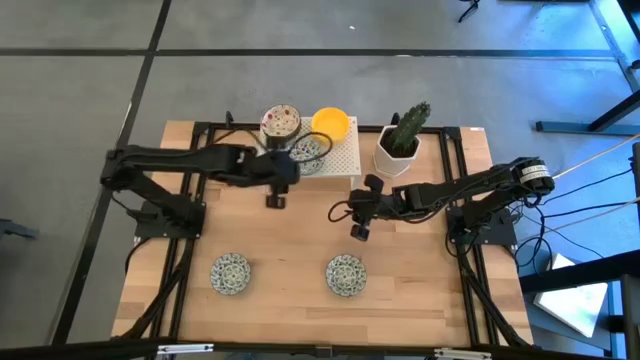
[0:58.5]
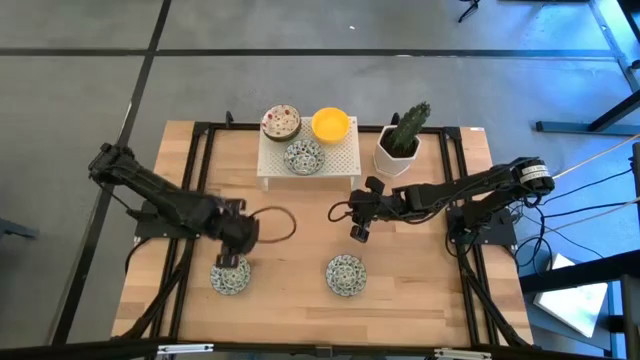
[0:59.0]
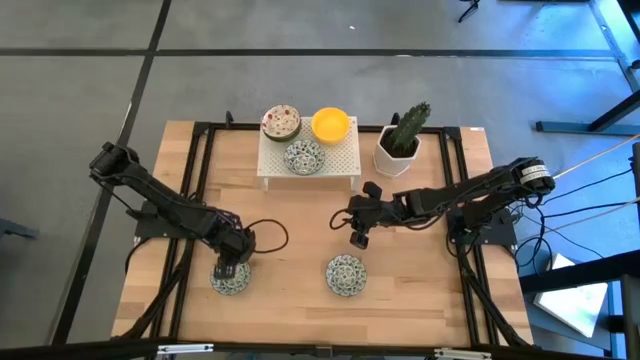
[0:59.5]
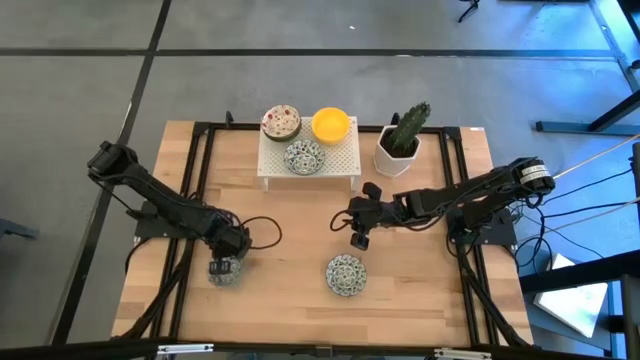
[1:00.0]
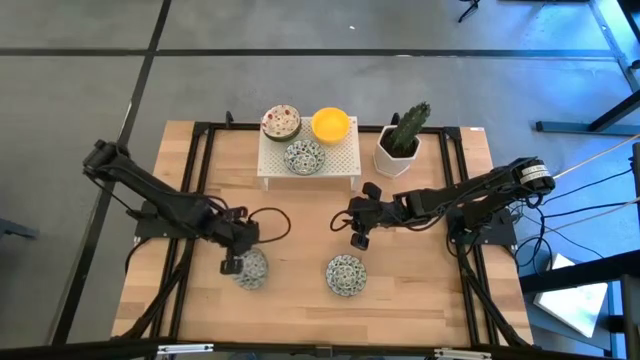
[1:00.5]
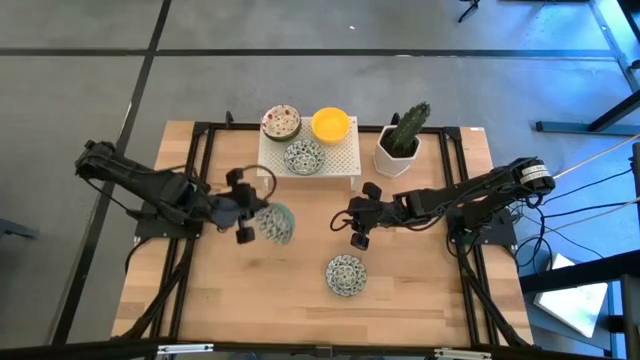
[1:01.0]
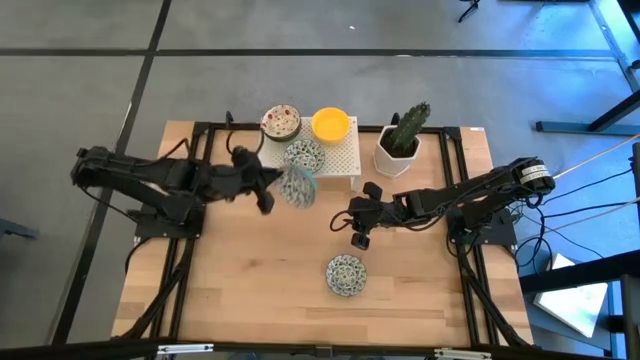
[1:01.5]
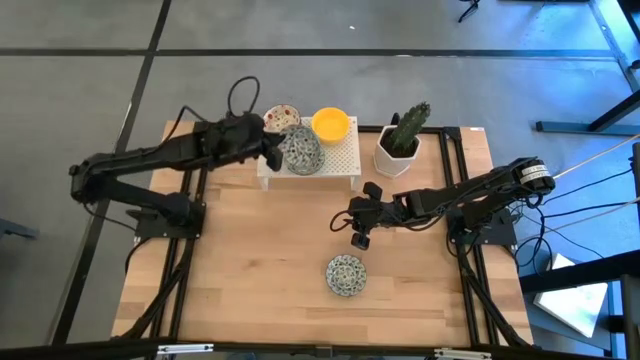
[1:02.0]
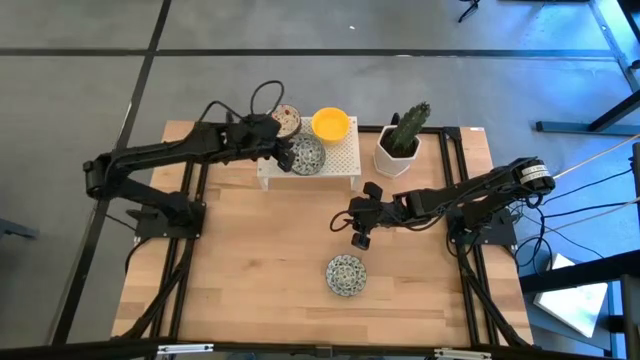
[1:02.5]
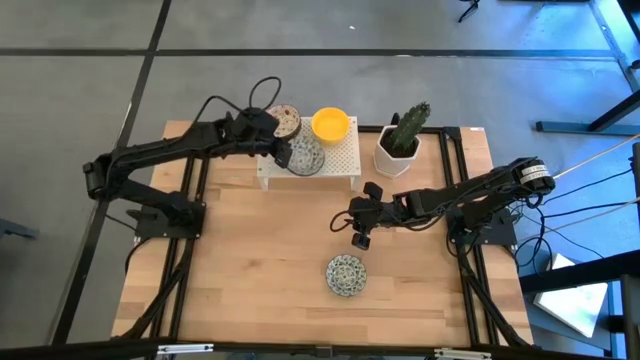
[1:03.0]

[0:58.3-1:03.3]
Task: Pick & Place Mini bowls
Stack the left blue patterned bowl on top of the blue patterned bowl on the shelf

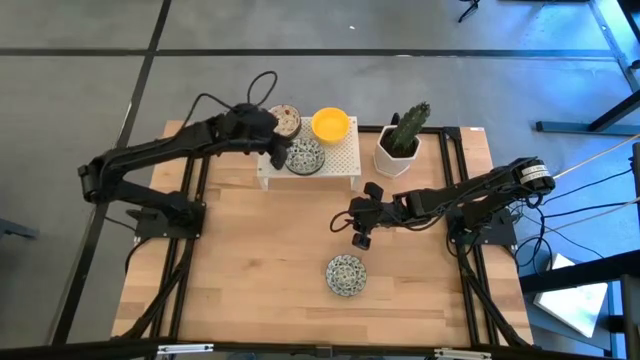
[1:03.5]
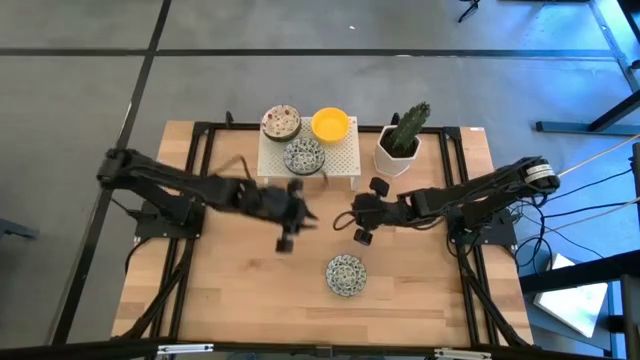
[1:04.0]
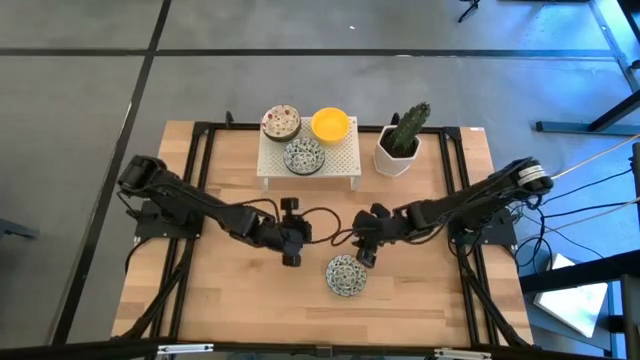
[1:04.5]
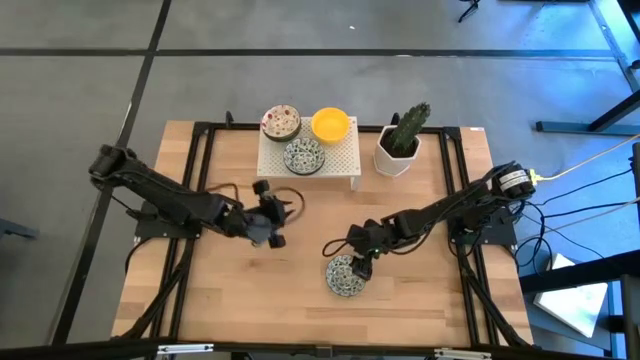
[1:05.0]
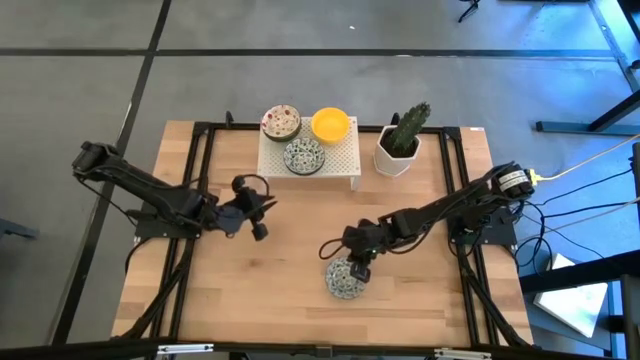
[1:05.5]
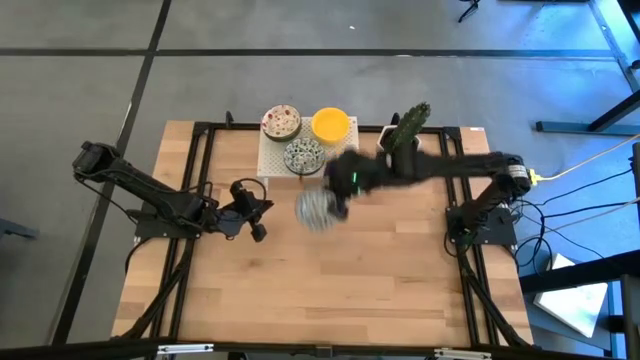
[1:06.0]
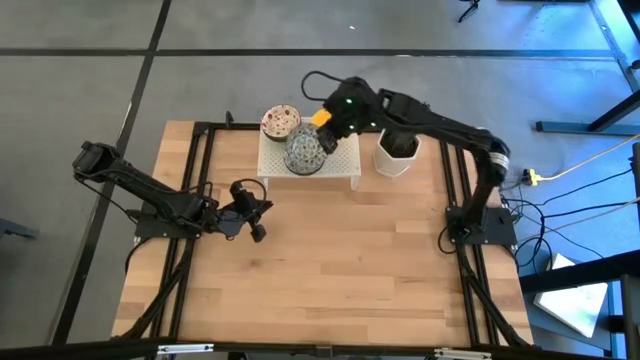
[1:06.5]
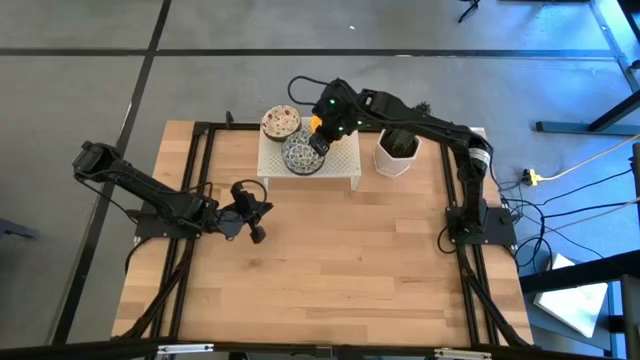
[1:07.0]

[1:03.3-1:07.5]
Stack the blue patterned bowl on top of the blue patterned bowl on the shelf

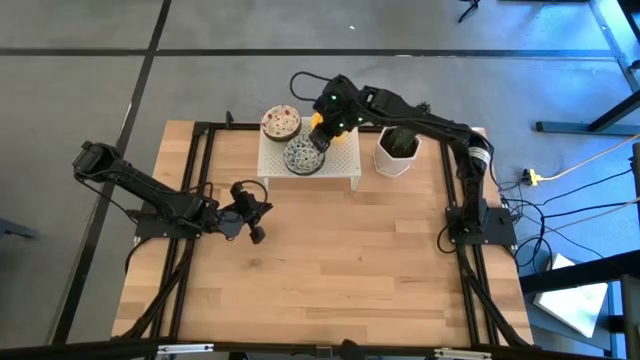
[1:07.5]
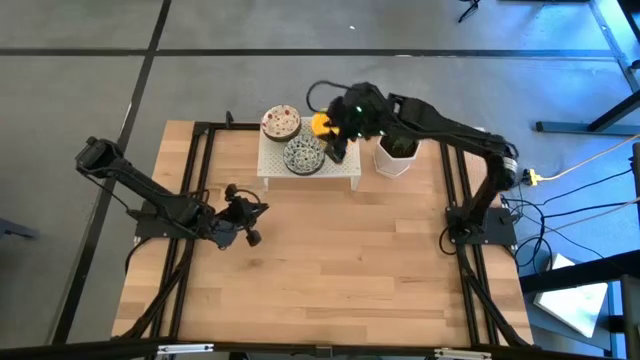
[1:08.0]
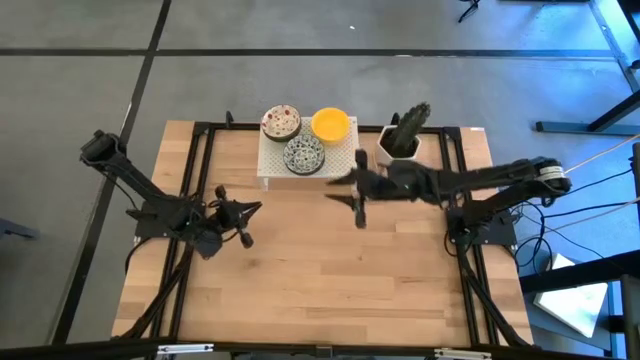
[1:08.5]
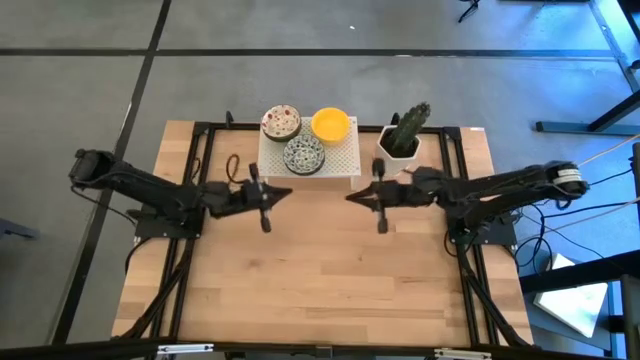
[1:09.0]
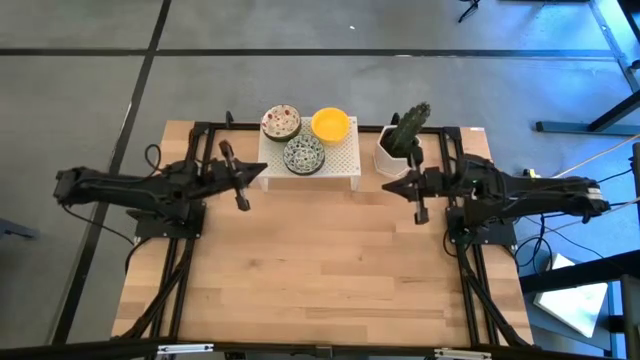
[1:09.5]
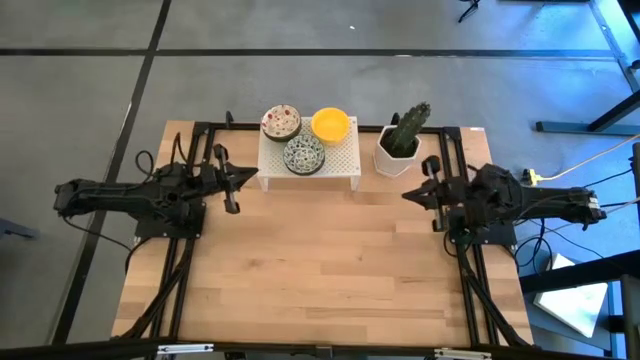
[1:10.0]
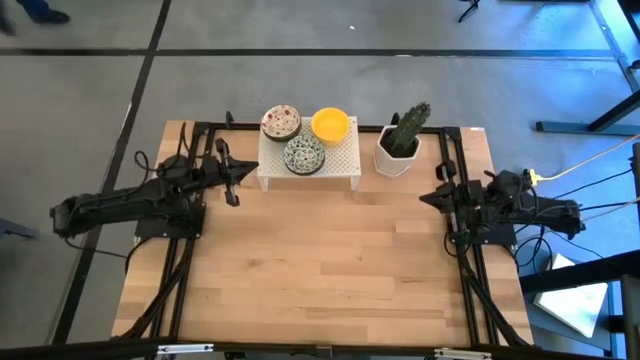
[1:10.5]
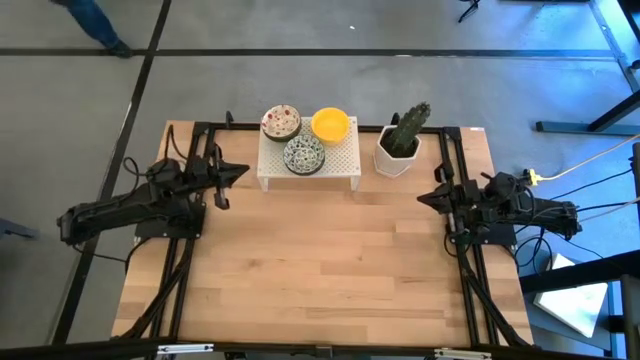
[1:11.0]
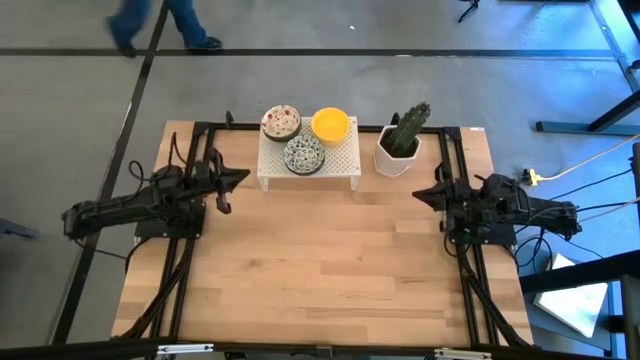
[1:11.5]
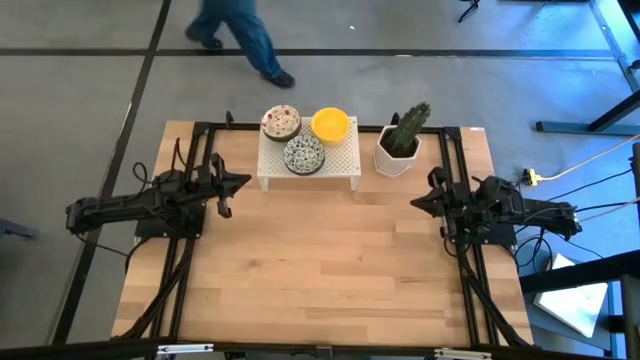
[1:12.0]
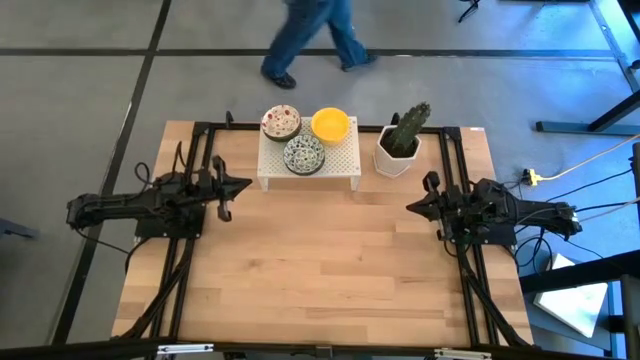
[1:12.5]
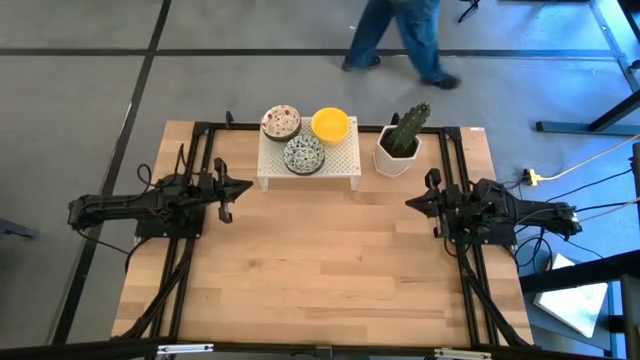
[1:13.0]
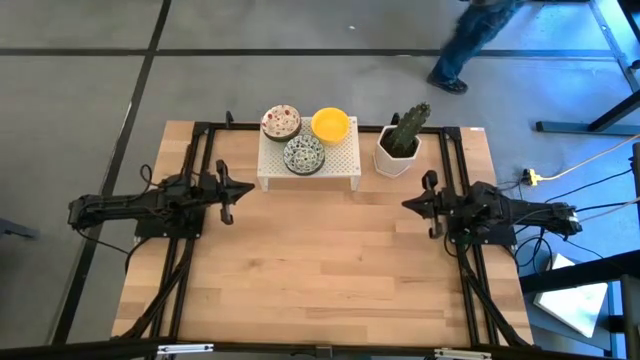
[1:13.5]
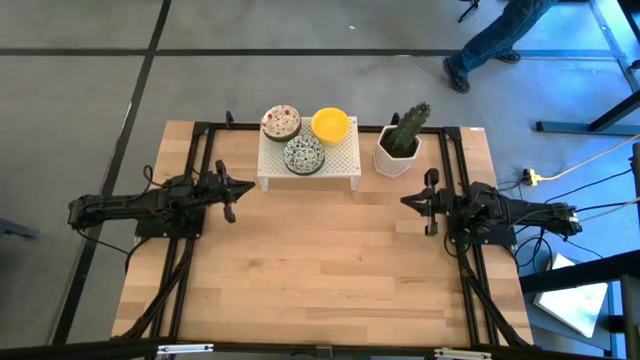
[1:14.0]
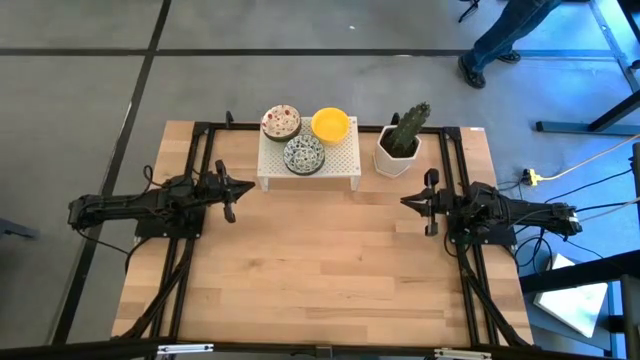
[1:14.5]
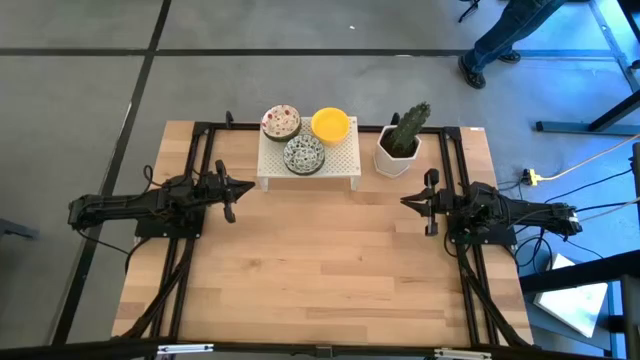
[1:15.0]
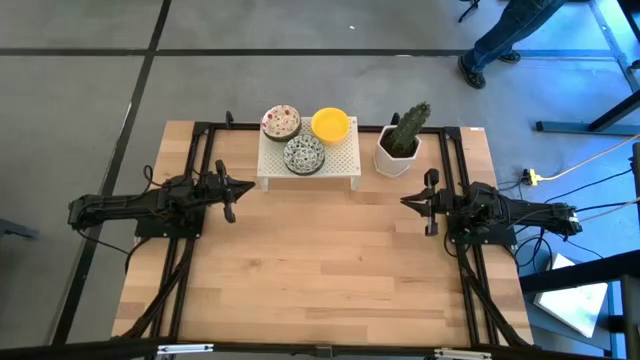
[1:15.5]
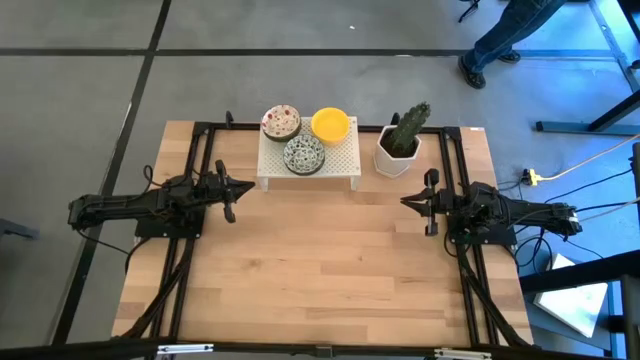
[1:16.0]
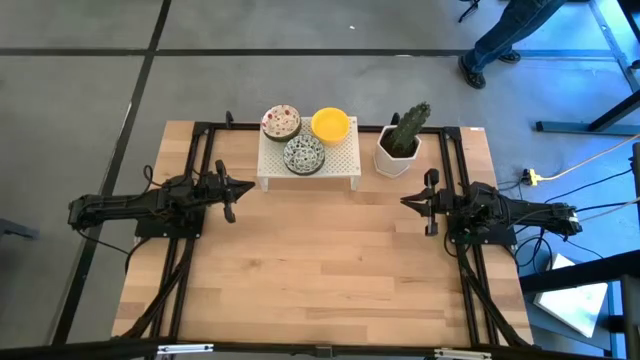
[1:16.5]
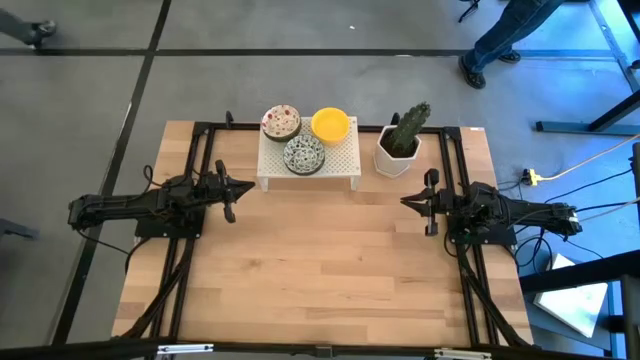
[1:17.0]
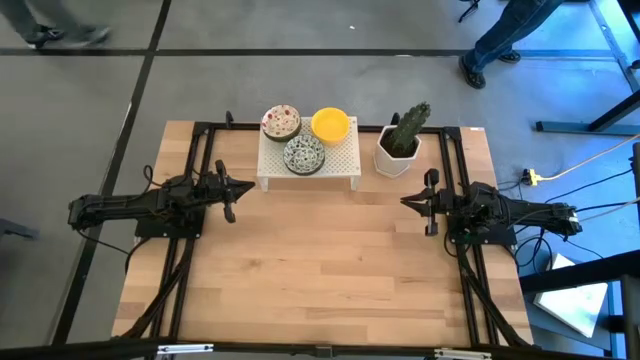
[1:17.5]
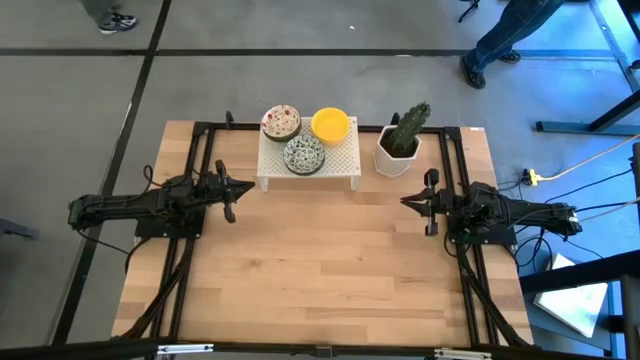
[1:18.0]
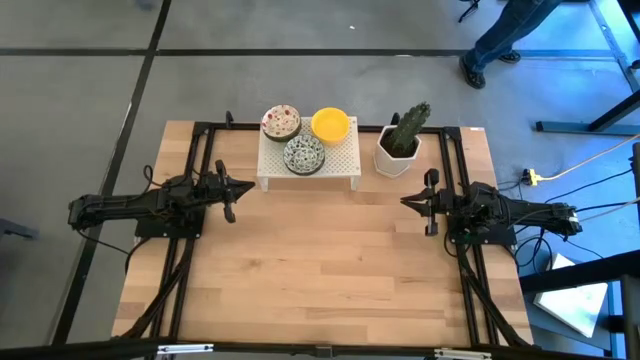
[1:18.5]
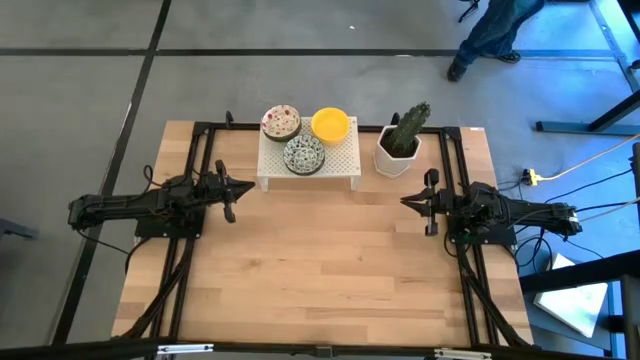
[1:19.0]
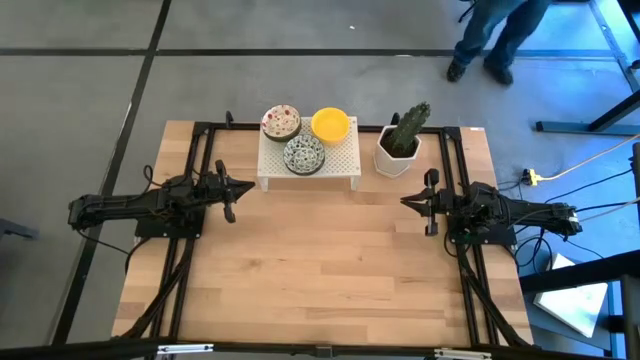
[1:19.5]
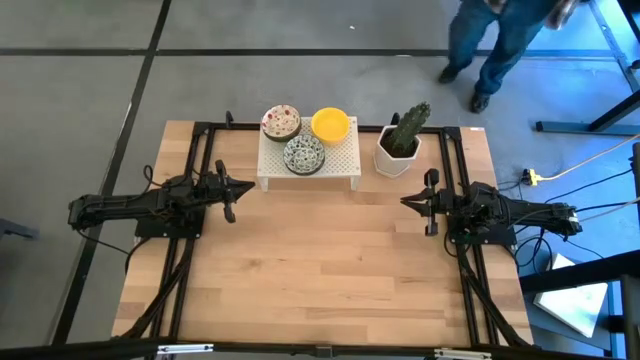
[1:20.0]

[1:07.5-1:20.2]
Return to Home Position
